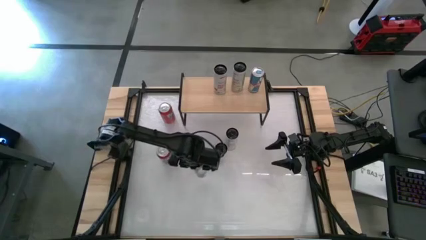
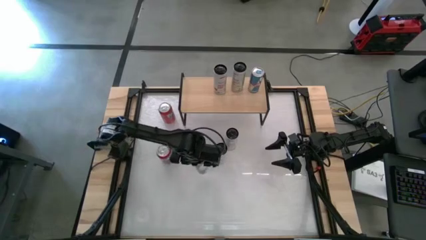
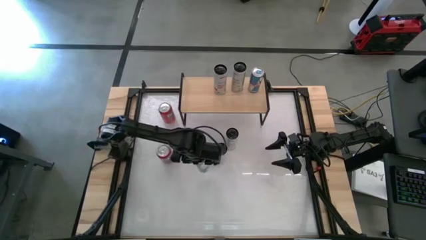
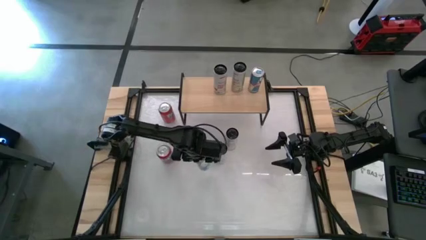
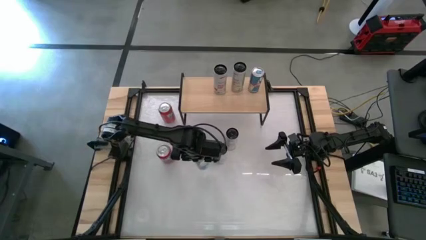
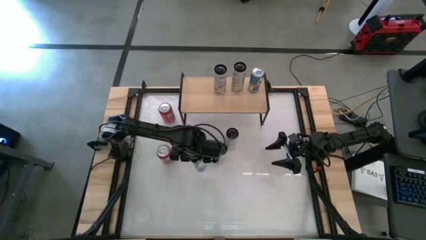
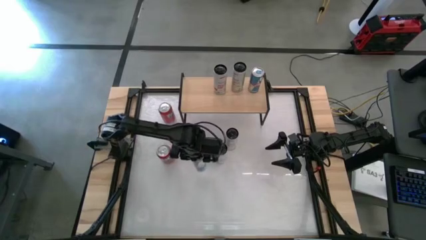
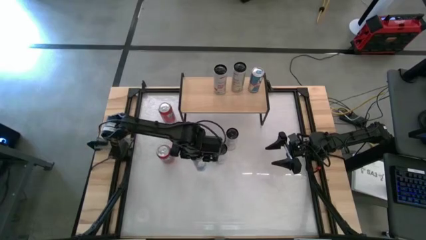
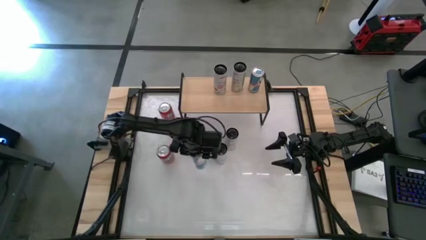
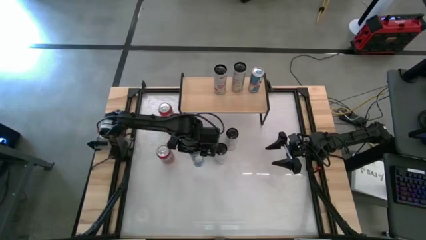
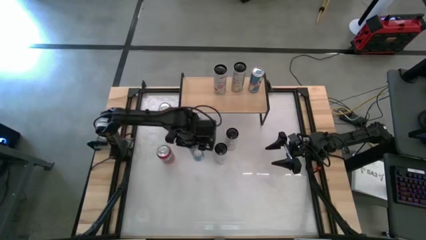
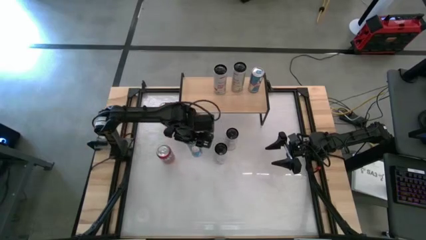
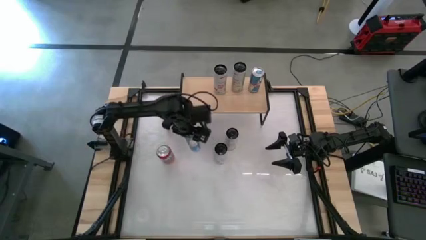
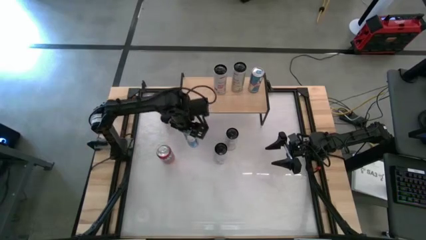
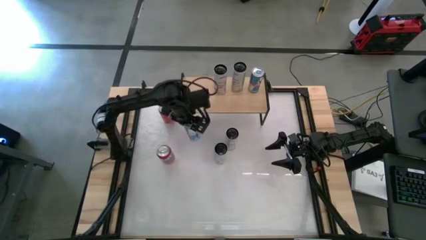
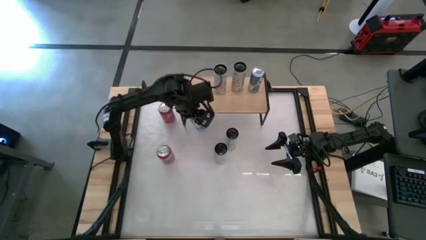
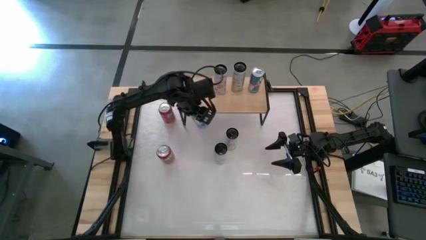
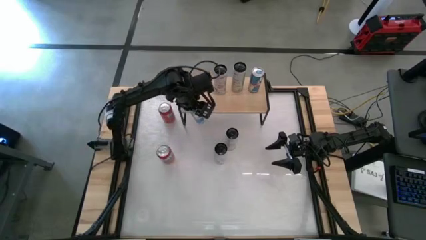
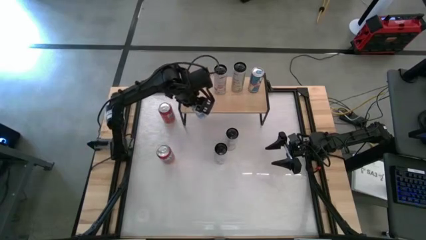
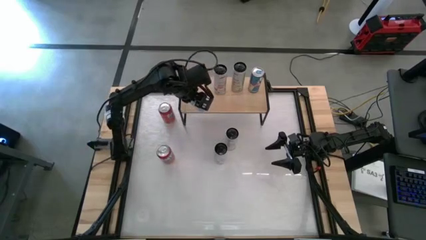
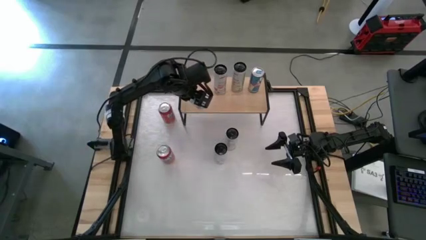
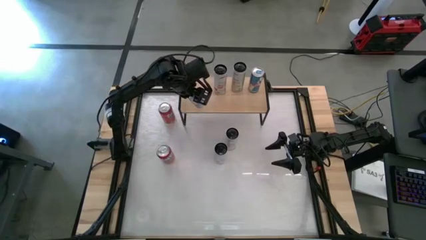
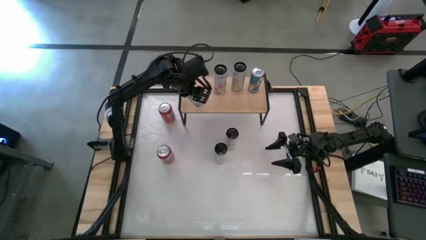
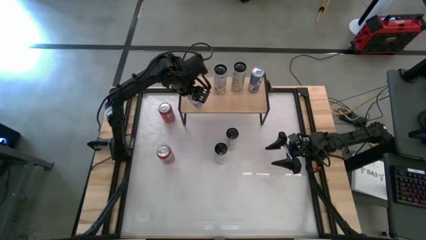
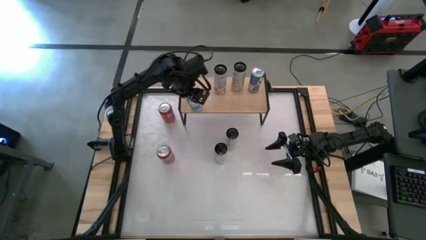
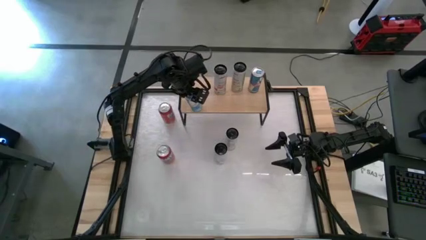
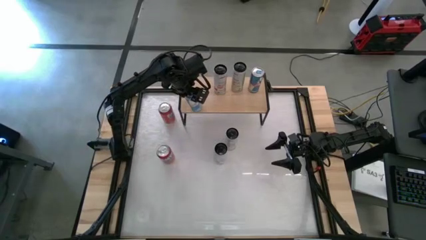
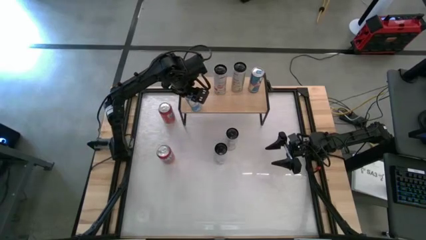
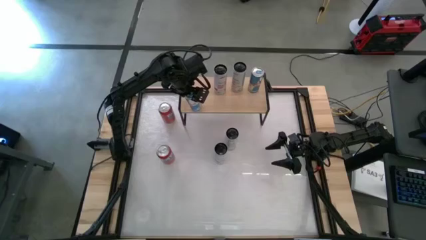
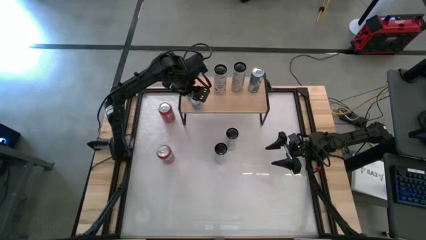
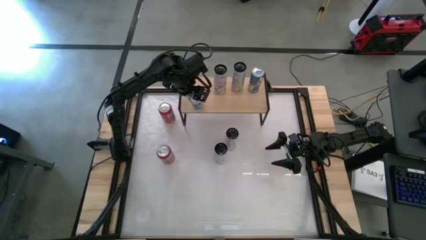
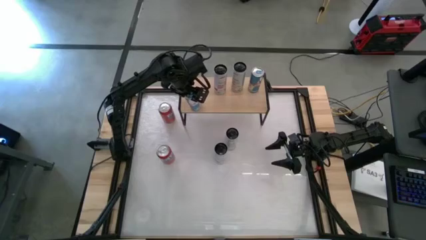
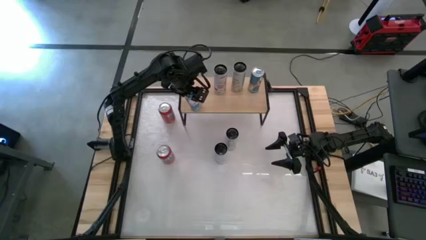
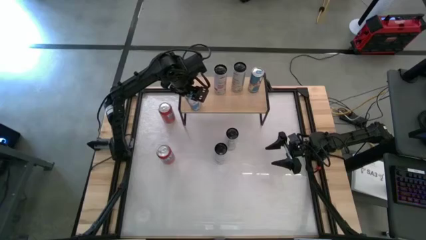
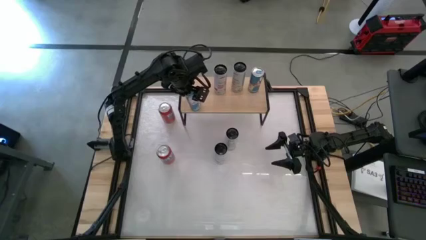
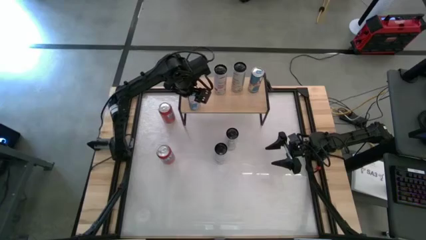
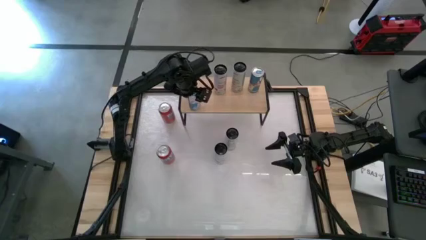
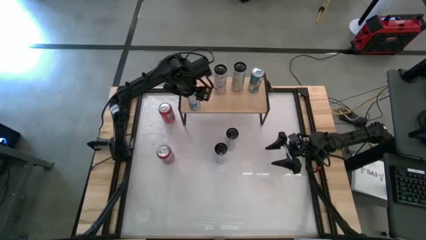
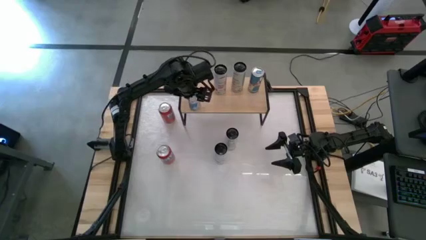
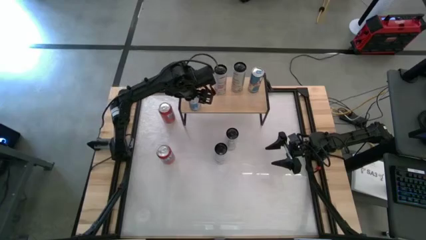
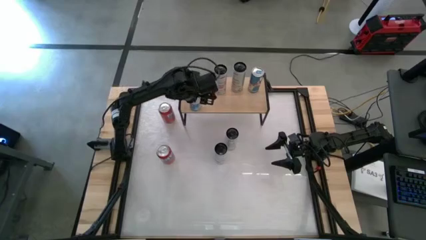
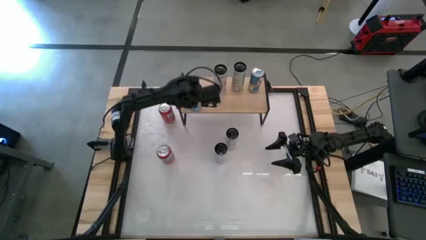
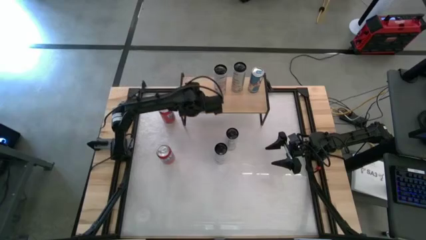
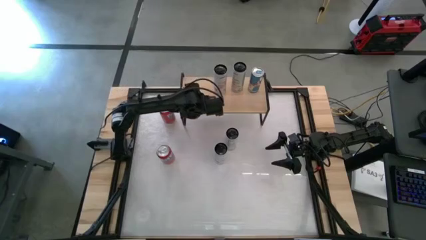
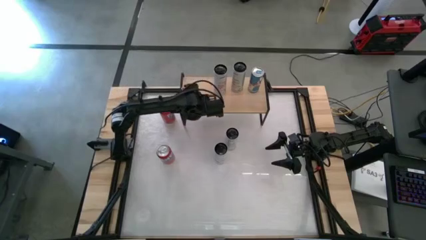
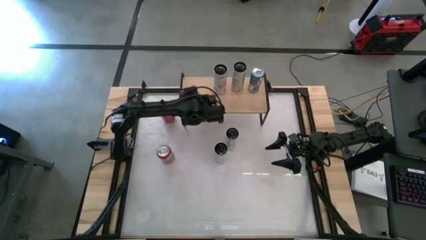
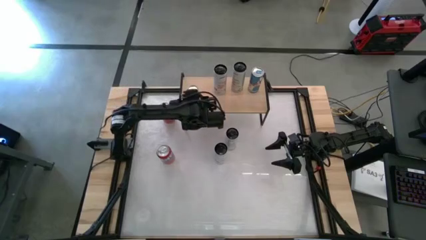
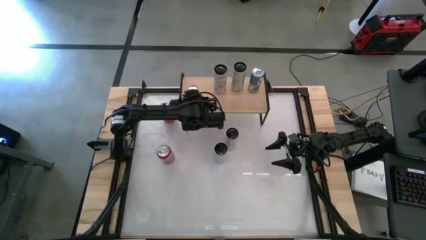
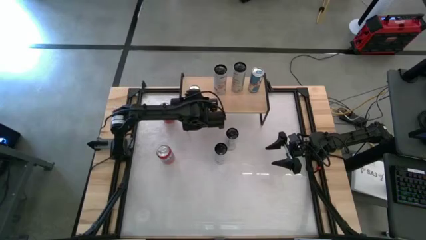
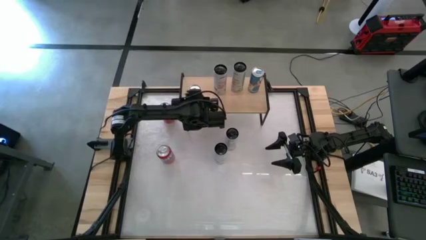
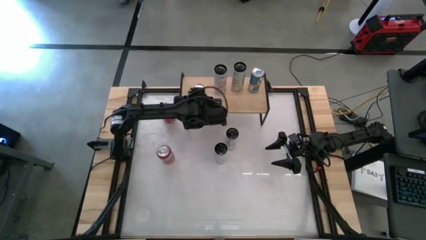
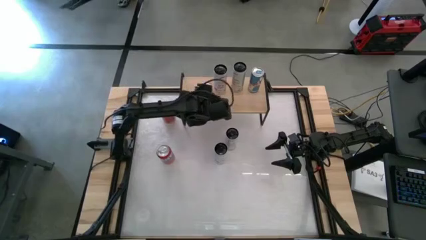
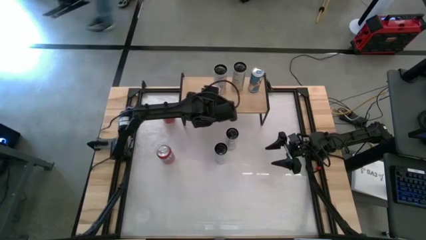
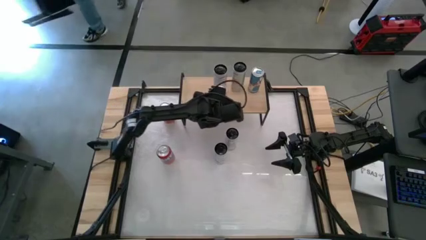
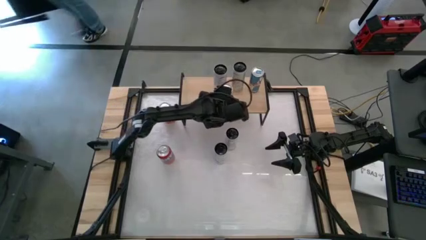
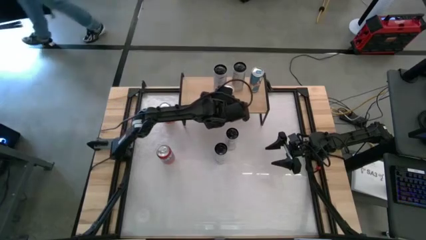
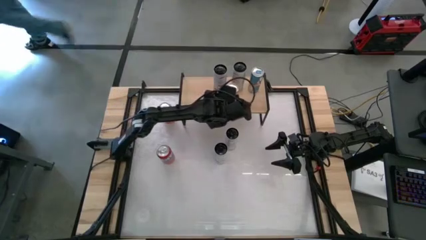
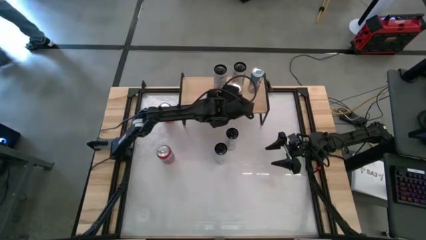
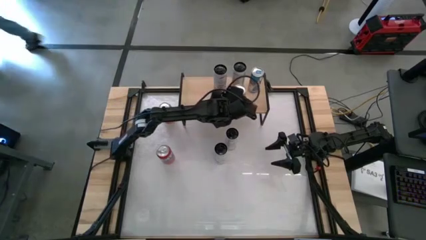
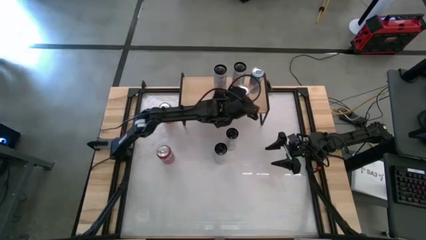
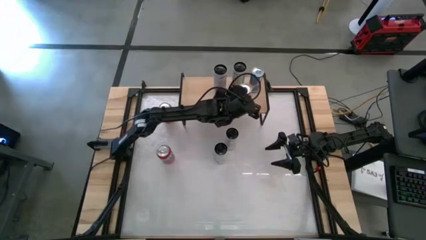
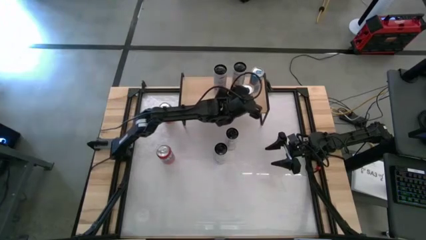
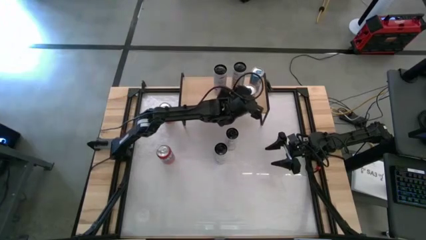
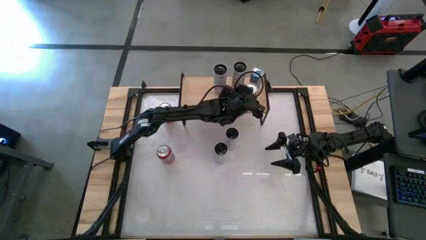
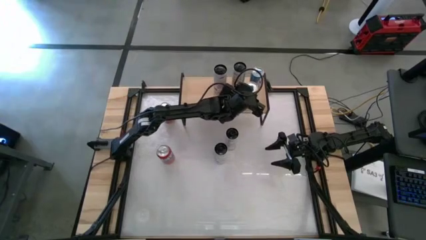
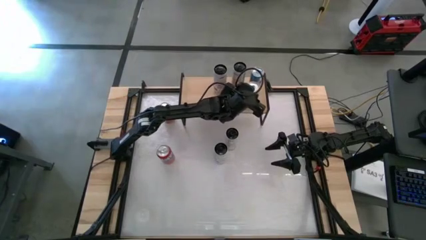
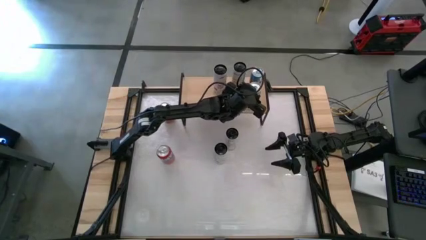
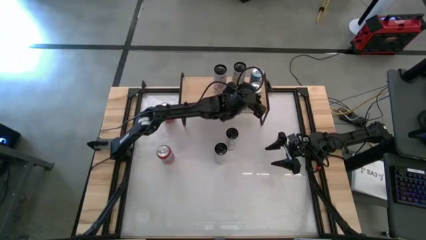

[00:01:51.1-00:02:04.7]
Task: Place canned beverage on shelf
Put the blue soda can on the shelf aligned with the other blue soda can

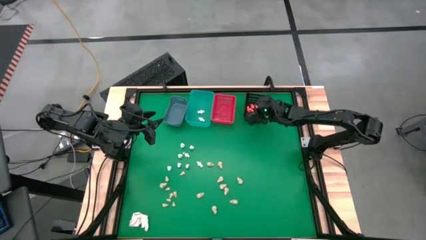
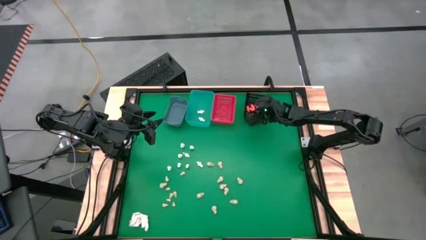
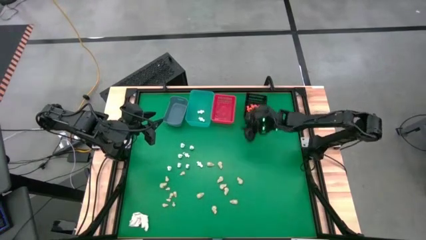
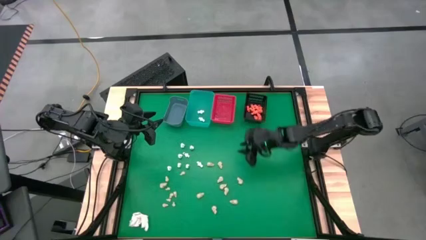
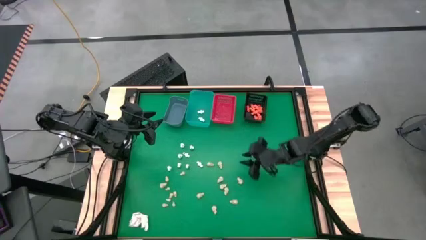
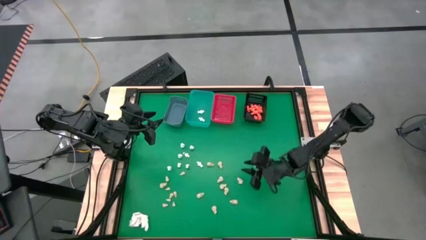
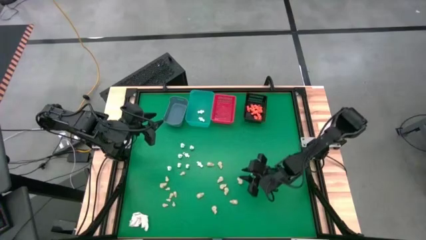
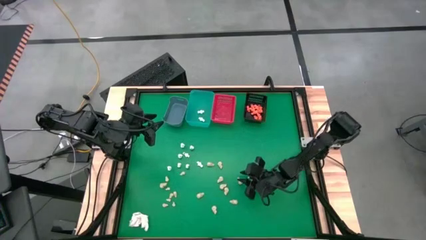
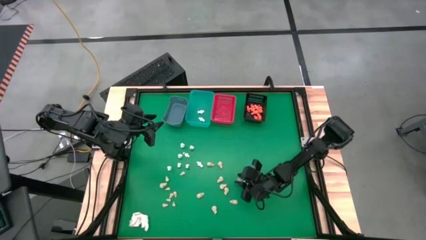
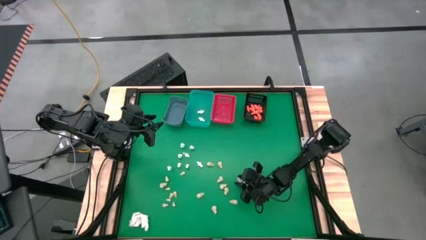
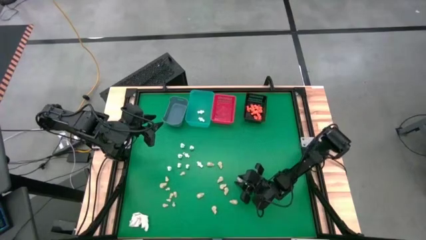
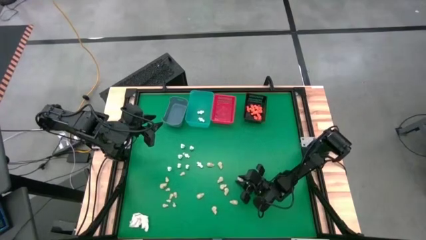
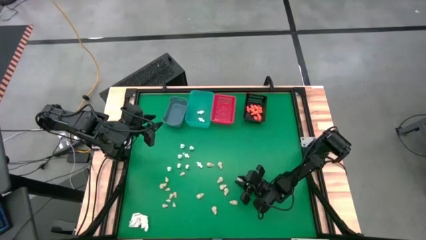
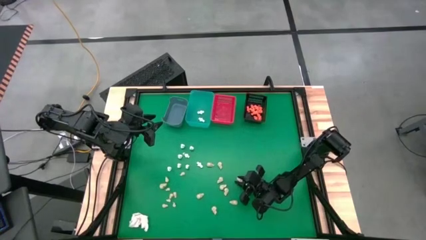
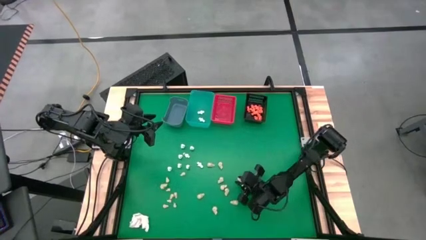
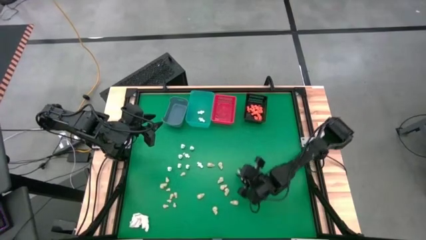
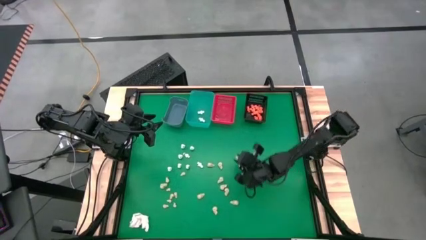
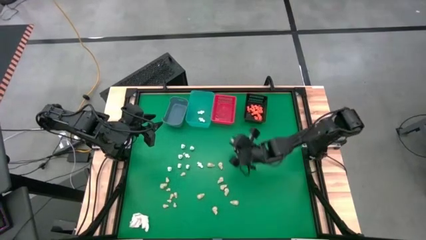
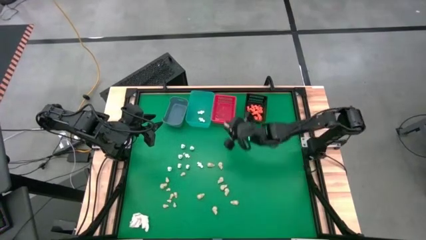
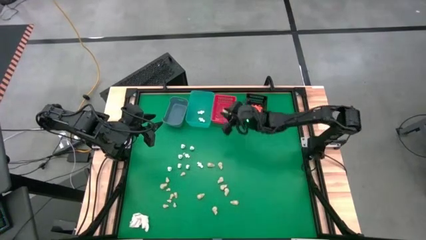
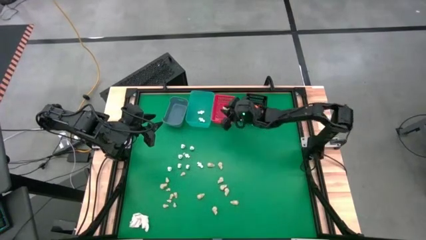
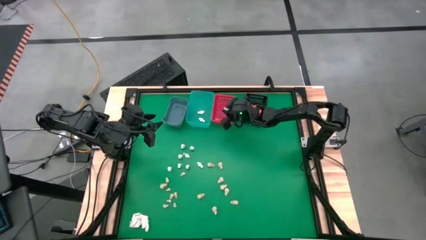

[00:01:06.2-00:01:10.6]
Task: Sort Halloween decoration
Put the white skull toy into the red bin
